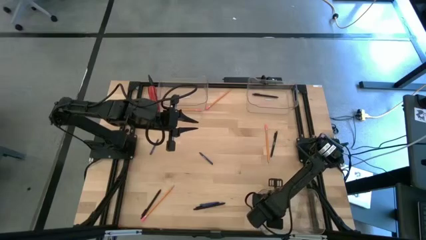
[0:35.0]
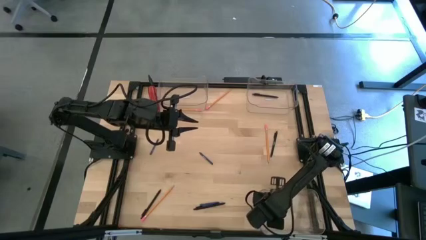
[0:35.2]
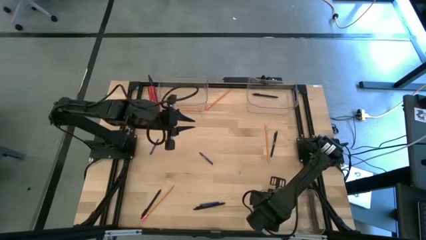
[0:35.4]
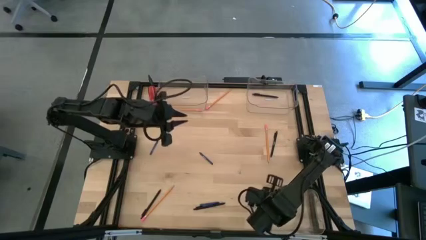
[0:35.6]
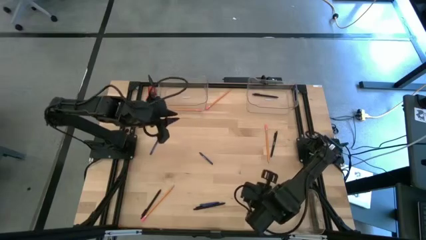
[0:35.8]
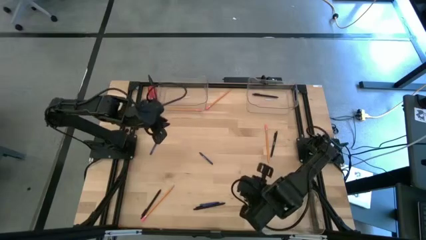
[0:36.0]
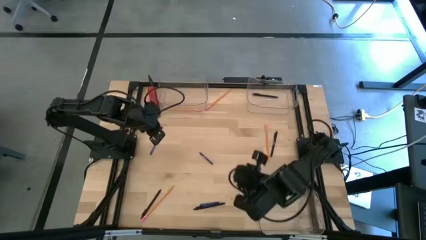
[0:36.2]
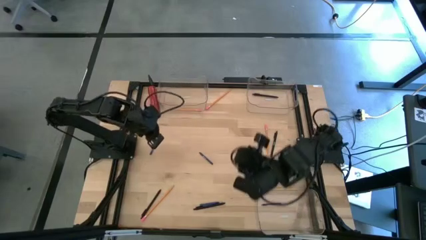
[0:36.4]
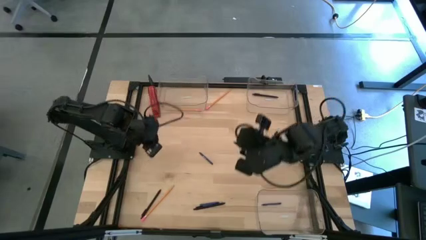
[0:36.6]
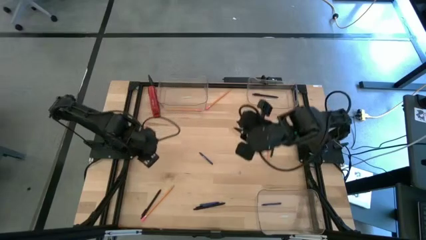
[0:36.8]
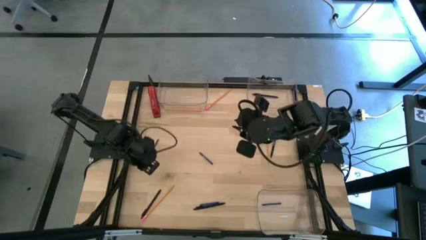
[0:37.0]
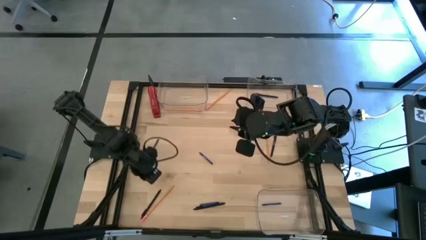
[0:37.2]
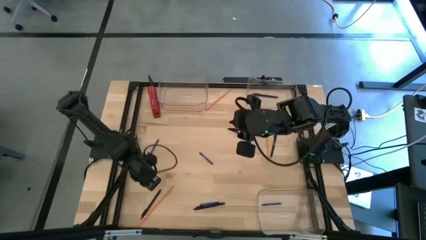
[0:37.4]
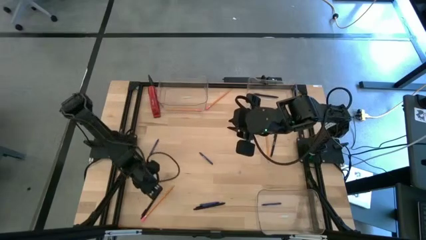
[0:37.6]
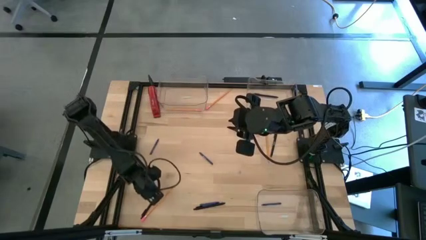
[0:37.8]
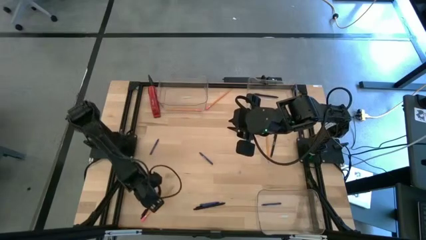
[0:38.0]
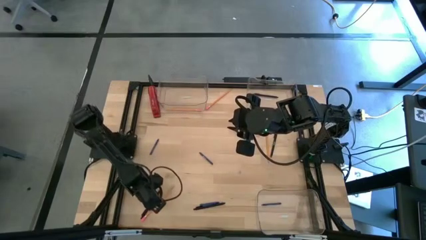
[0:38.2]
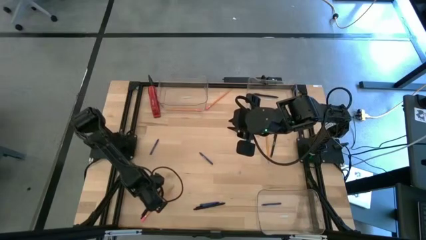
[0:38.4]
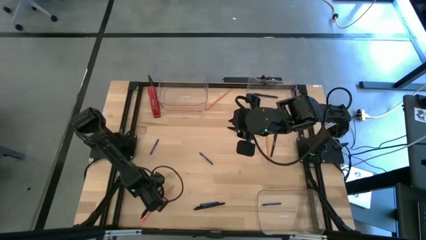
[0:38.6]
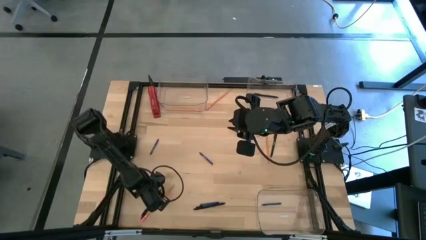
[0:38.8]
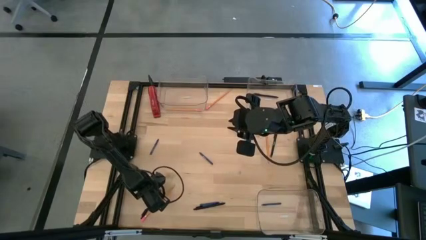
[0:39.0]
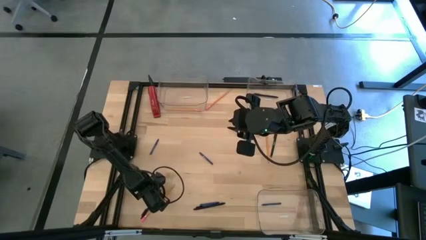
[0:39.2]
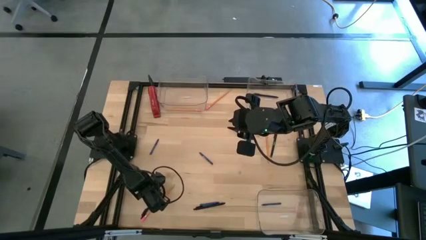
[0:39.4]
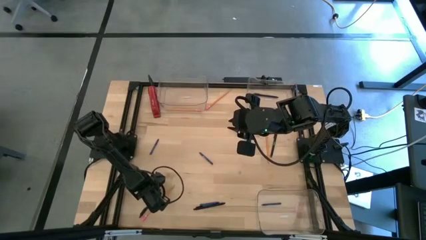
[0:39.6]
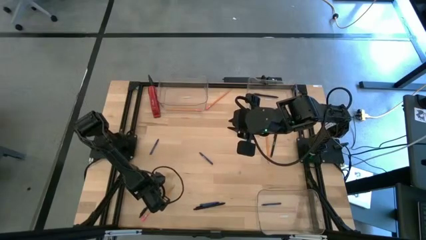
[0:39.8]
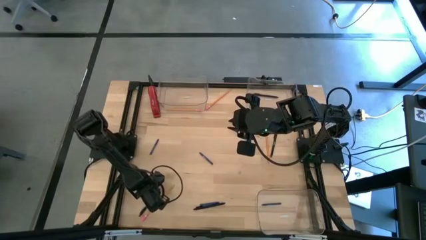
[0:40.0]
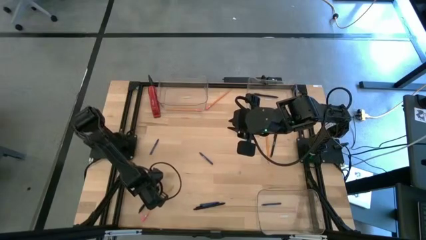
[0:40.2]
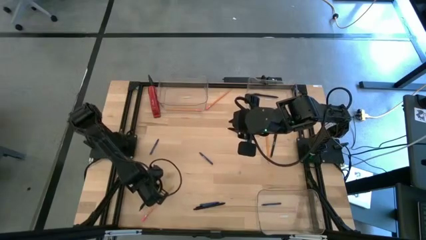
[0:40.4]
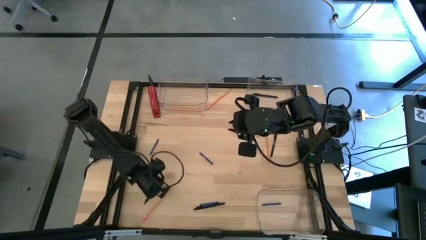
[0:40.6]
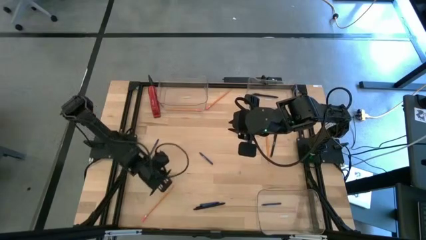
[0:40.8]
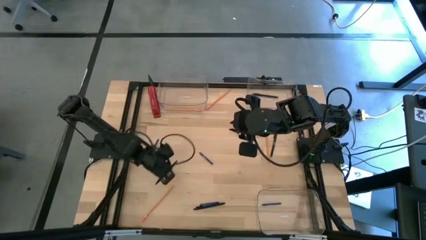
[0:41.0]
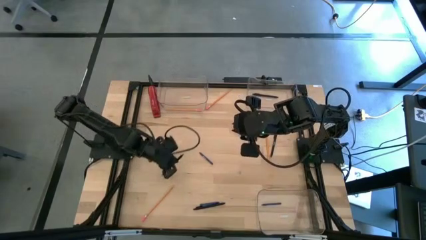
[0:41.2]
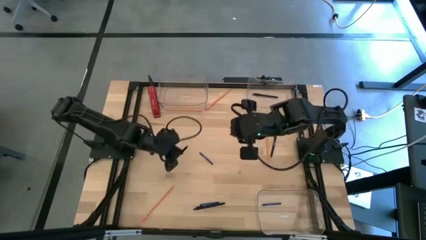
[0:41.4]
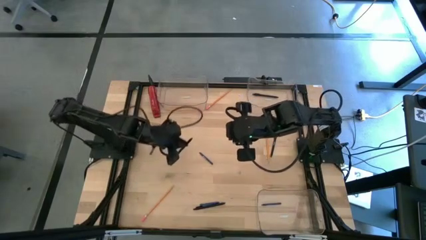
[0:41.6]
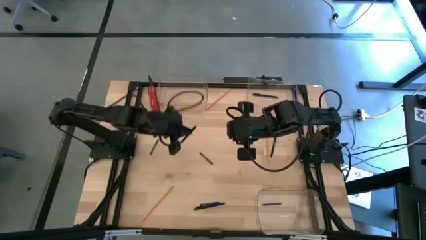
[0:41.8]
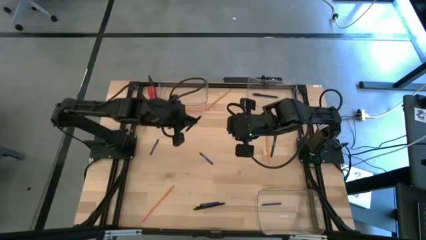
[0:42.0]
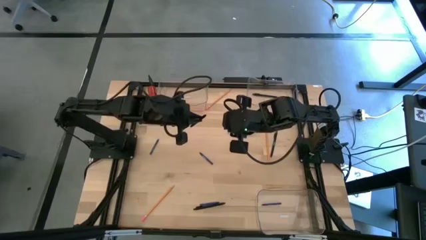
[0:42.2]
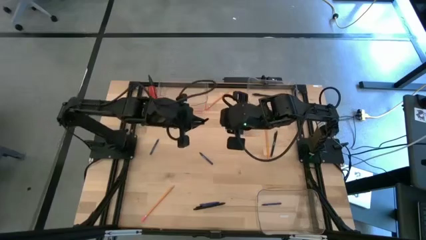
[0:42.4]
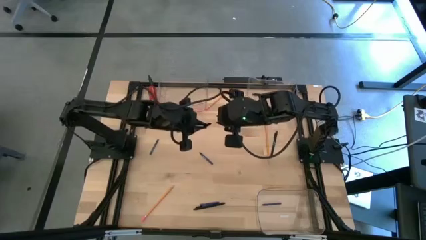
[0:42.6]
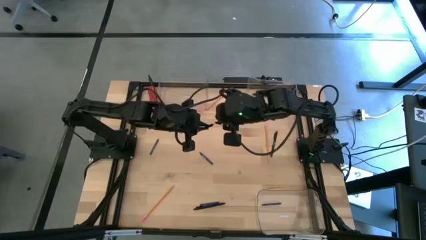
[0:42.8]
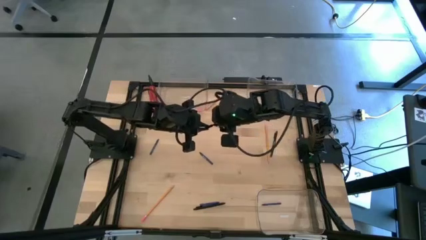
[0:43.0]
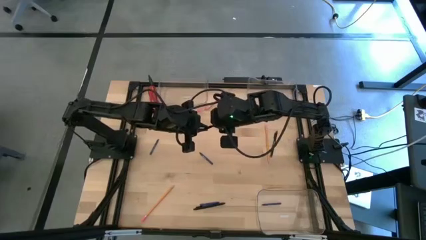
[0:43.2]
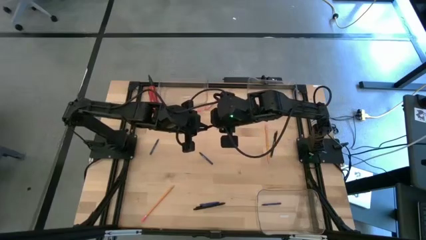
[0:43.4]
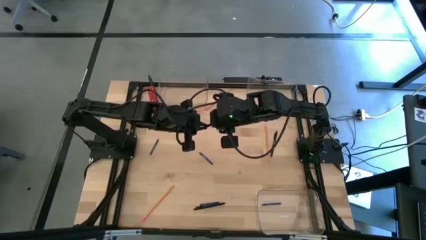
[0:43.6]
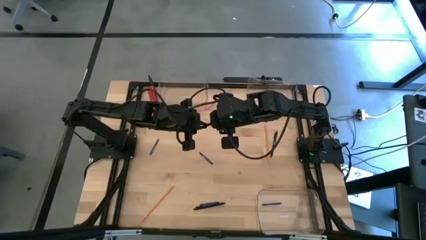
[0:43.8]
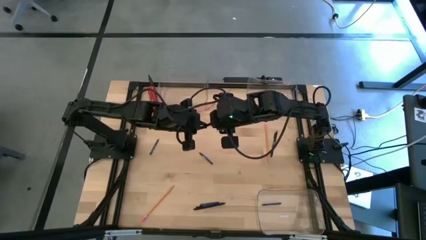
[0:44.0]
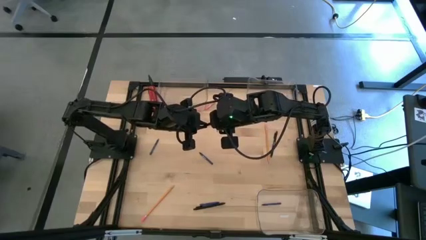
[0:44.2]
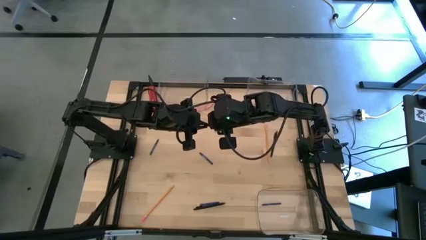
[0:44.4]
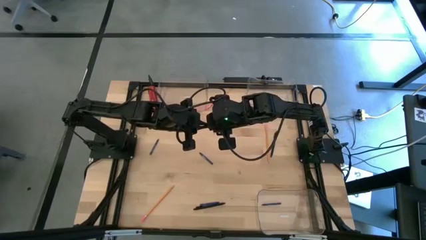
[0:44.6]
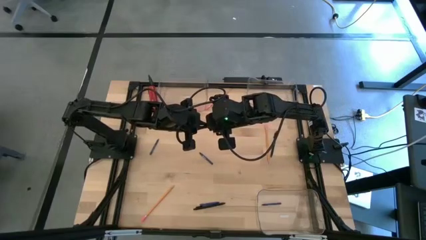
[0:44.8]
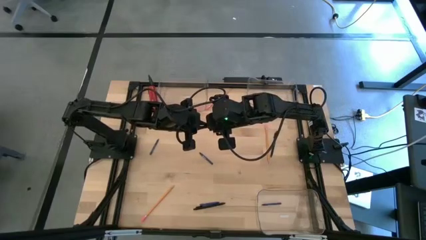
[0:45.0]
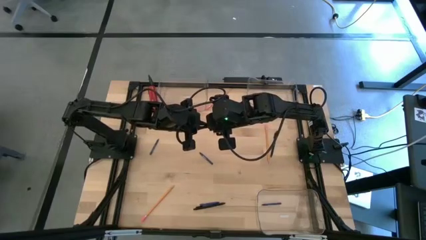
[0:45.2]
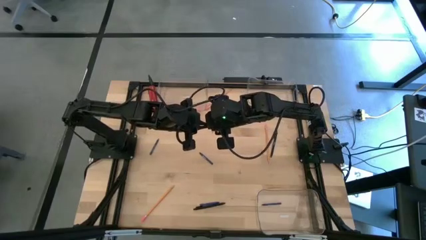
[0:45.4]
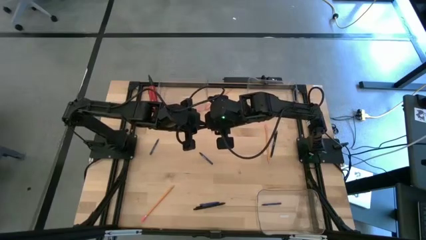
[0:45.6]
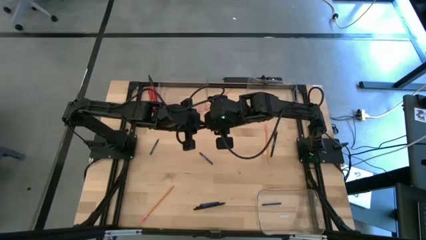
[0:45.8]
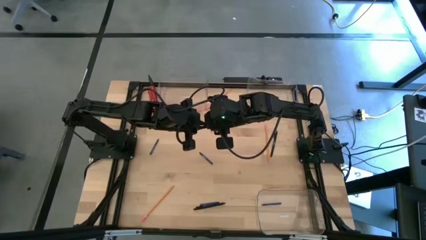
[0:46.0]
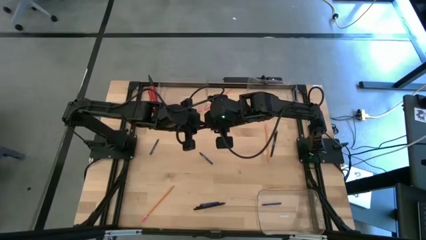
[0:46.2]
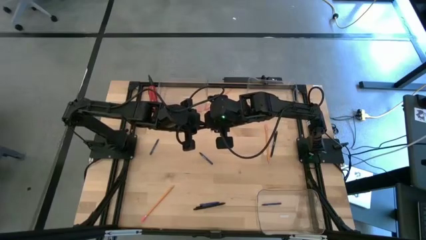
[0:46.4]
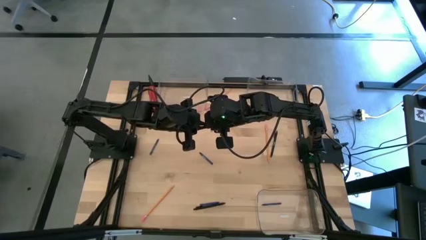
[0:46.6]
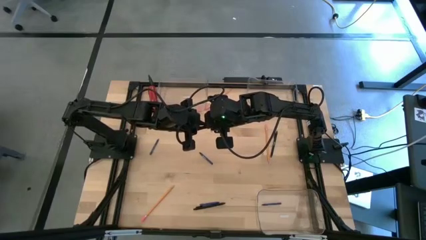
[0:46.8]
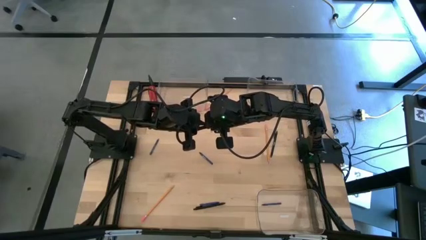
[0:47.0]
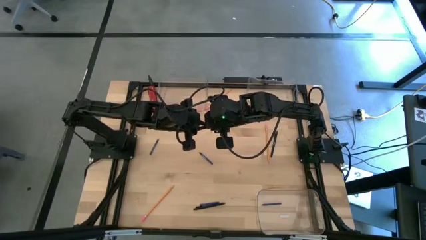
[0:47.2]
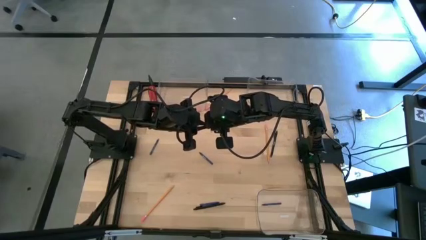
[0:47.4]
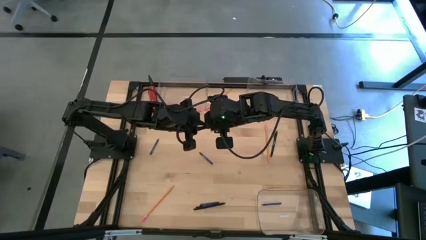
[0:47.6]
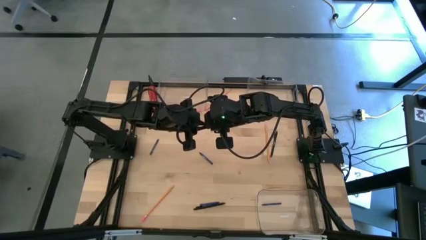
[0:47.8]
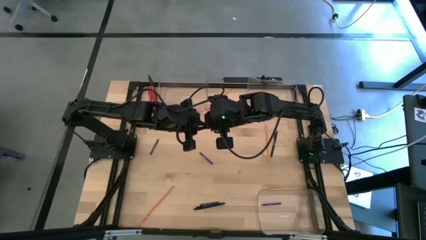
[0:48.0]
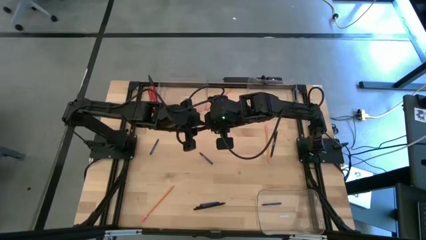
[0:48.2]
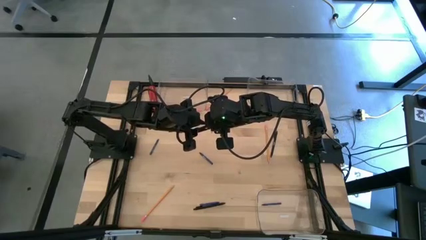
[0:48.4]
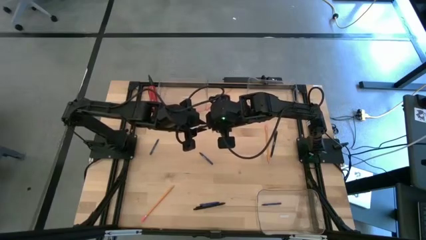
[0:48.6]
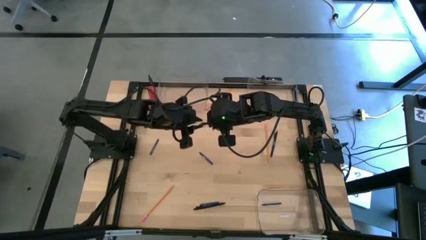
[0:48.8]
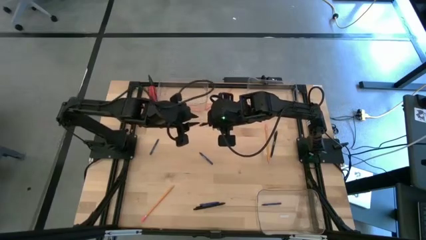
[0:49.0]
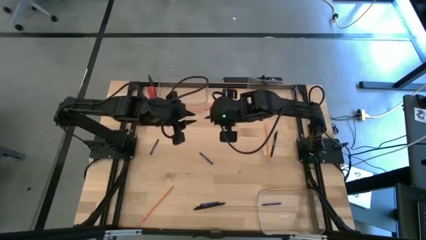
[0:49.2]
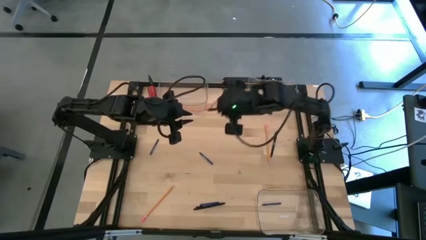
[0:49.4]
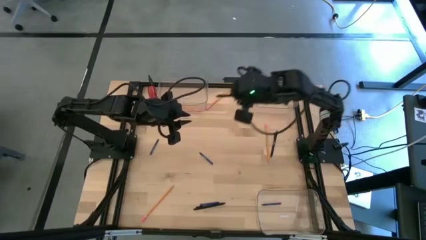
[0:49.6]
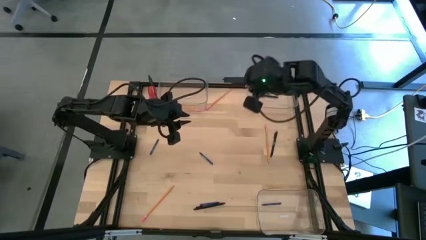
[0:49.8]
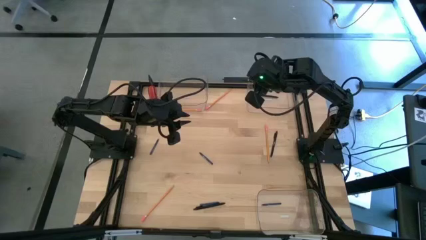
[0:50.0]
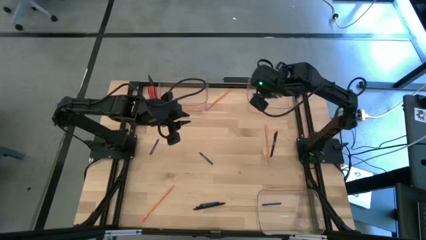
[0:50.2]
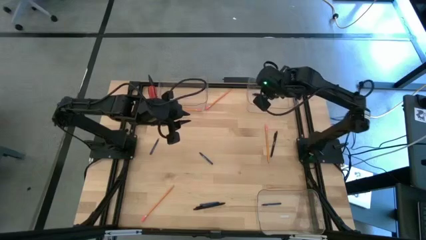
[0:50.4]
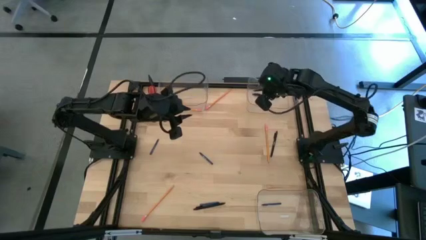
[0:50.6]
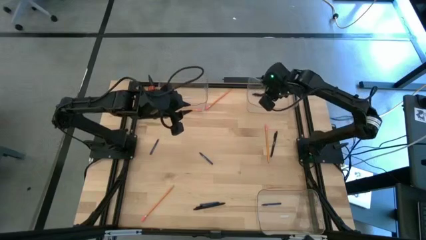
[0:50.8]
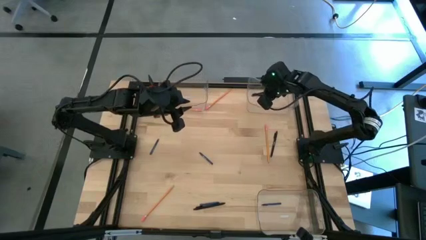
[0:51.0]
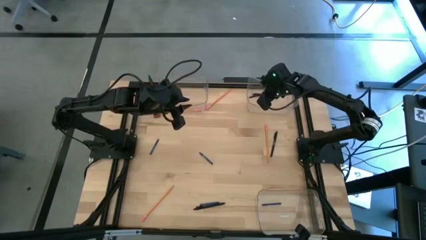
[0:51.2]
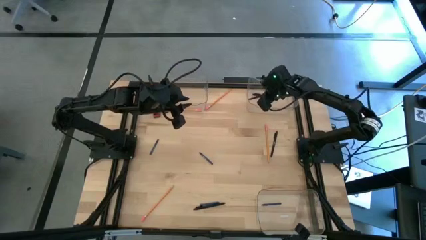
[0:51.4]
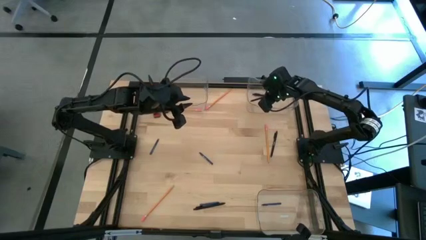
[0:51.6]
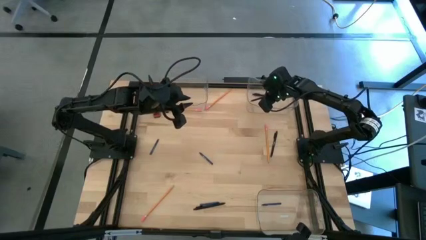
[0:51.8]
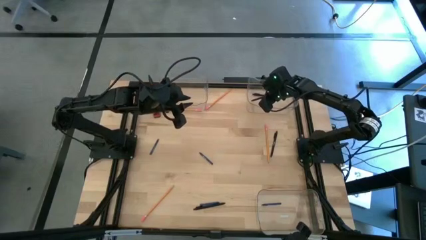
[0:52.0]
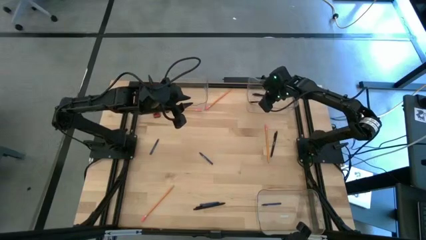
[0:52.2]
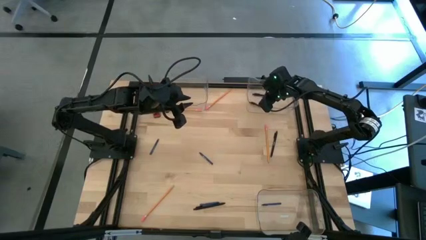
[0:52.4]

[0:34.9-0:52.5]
Task: Sort crayons/erasers/pens/pencils in bins
Put the black pen into the top right transparent bin
